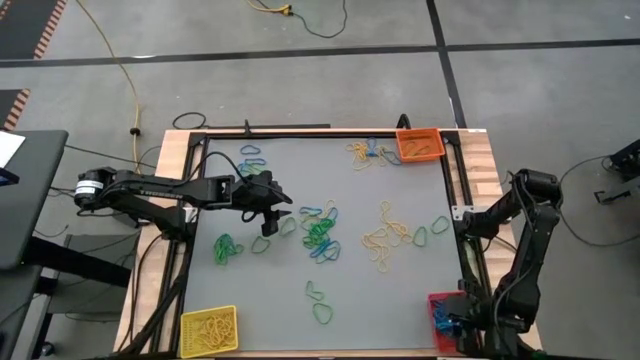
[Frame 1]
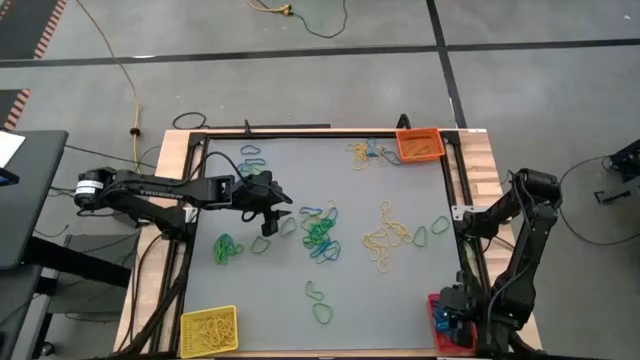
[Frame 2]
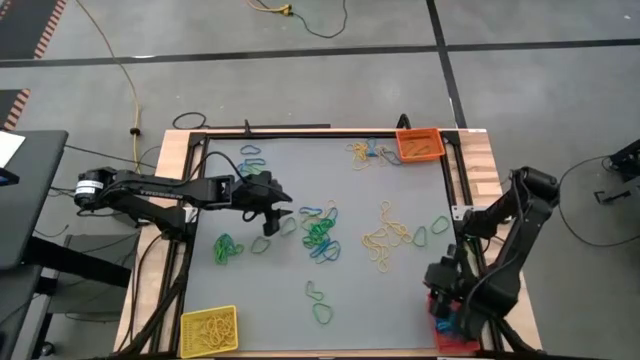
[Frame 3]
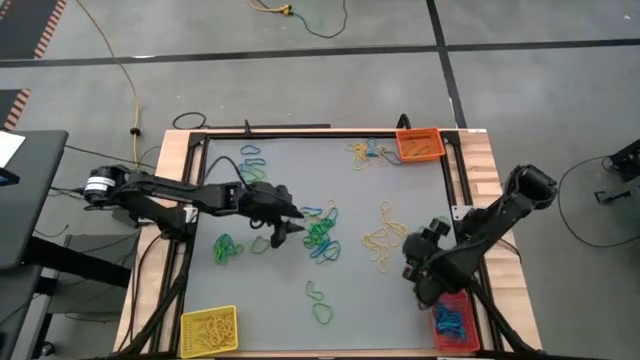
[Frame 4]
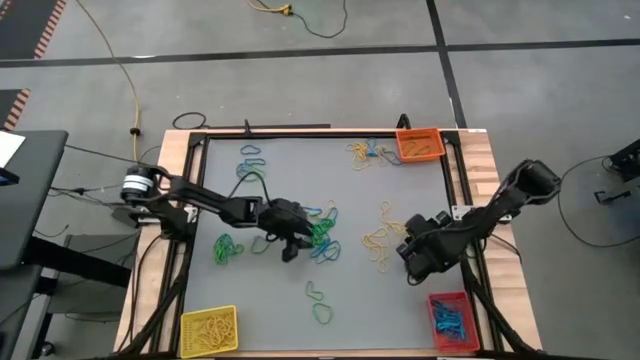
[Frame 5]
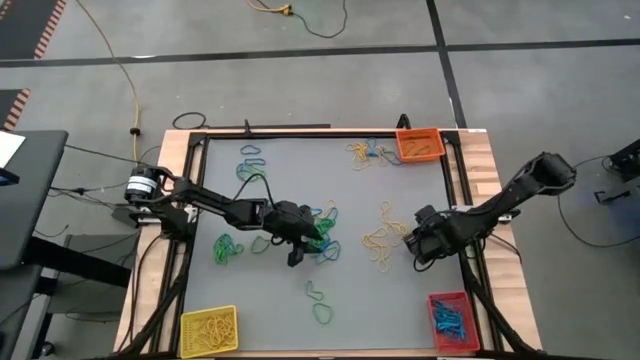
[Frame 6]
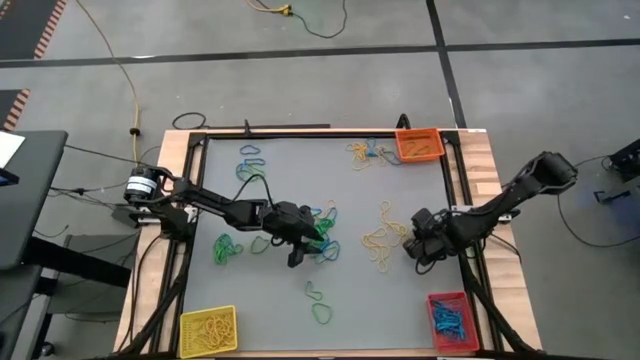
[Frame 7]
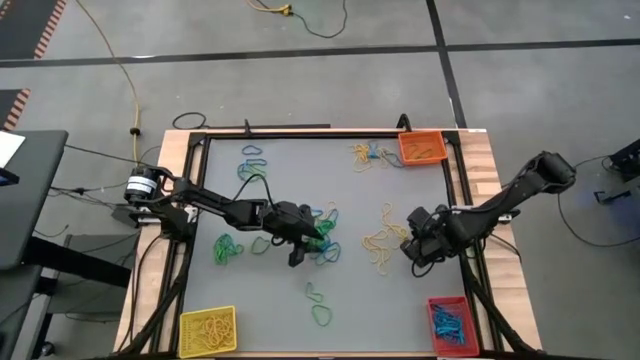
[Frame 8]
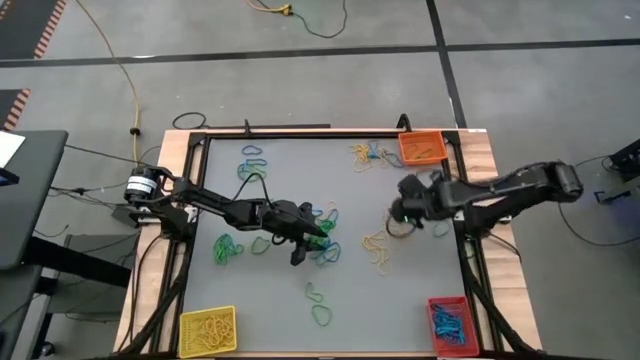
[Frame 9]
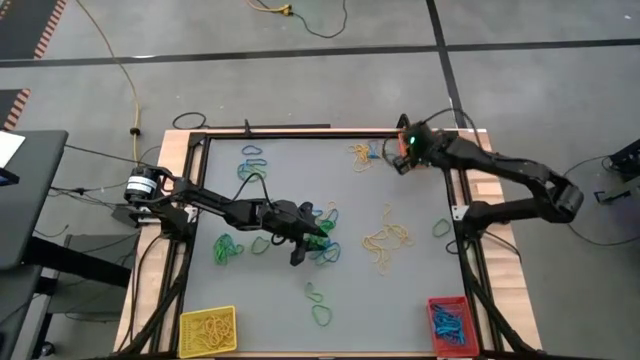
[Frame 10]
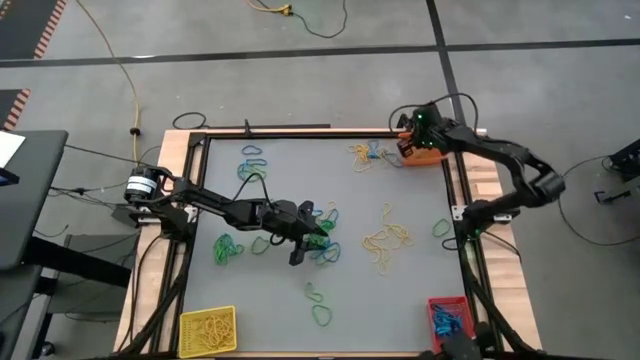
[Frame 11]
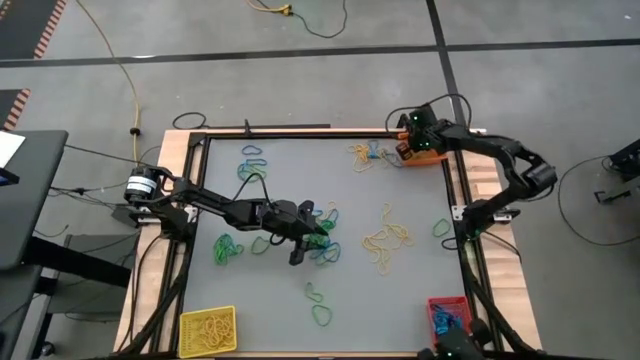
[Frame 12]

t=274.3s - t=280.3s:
Task: Sort rubber bands into baskets
Put the green rubber band into the orange bin

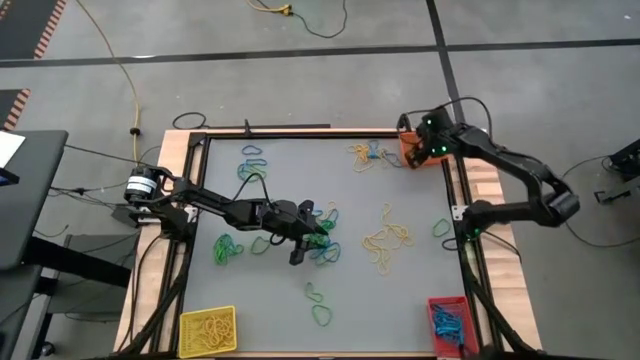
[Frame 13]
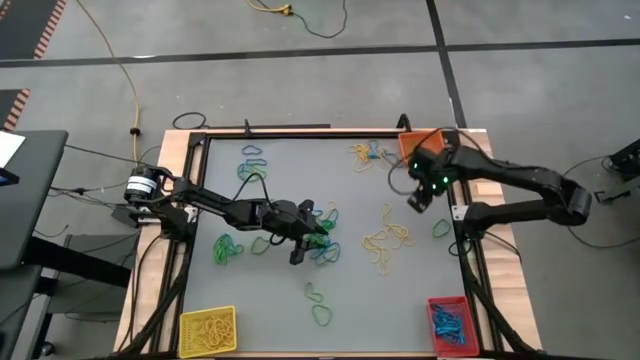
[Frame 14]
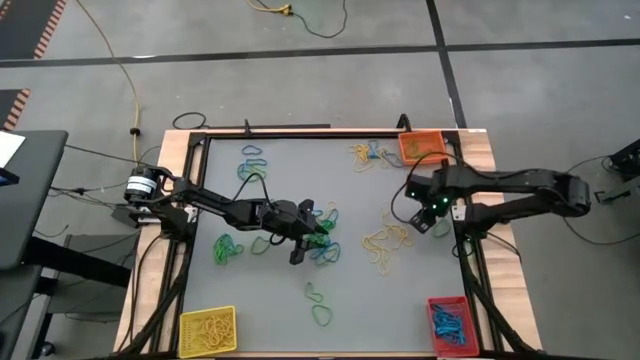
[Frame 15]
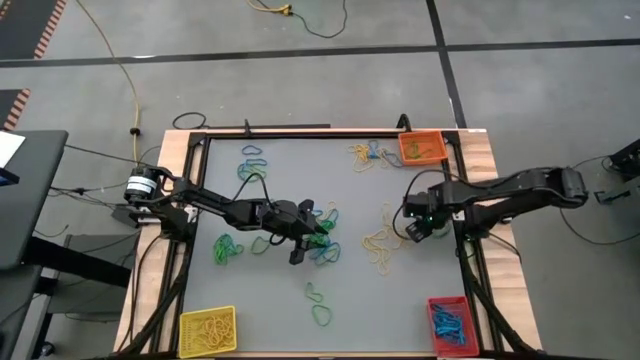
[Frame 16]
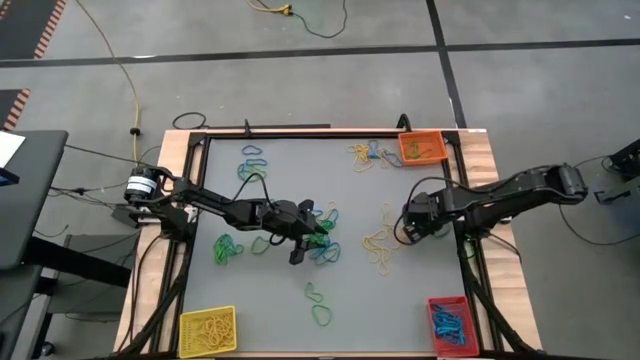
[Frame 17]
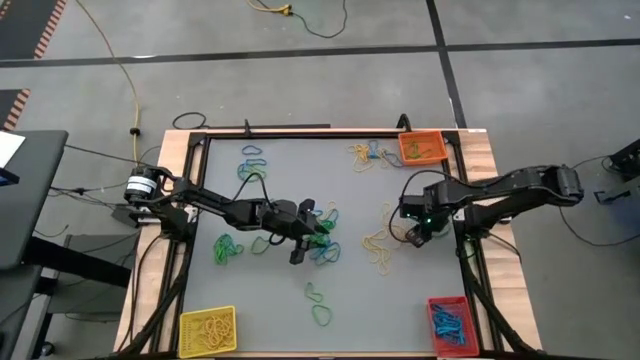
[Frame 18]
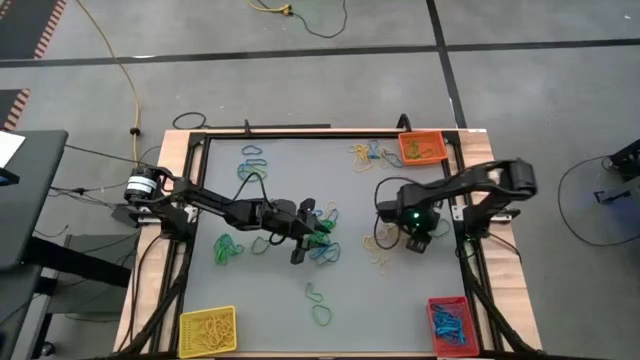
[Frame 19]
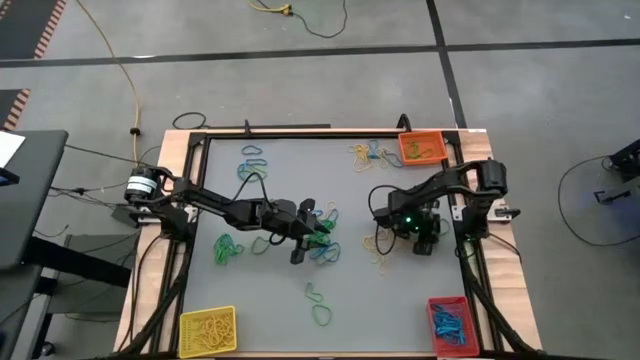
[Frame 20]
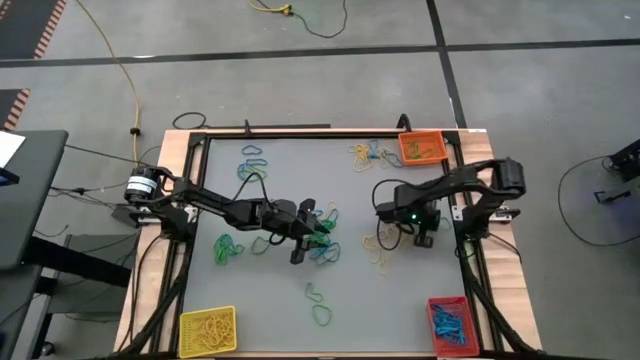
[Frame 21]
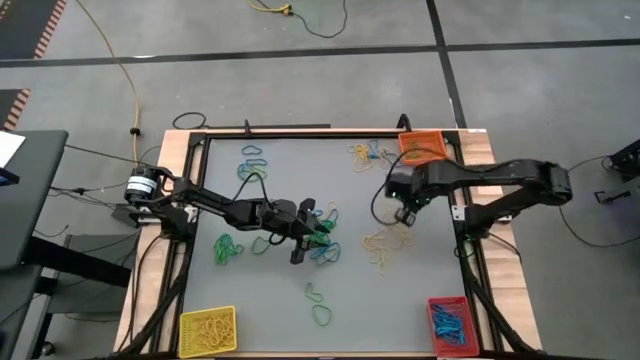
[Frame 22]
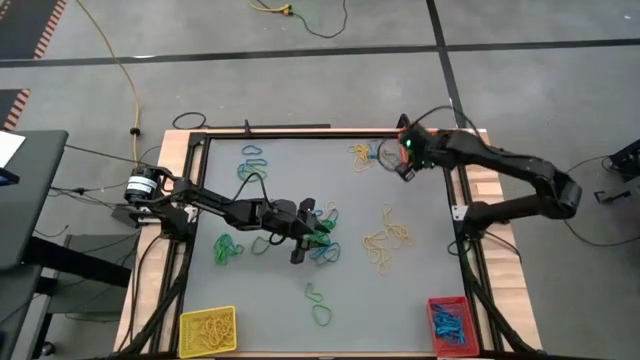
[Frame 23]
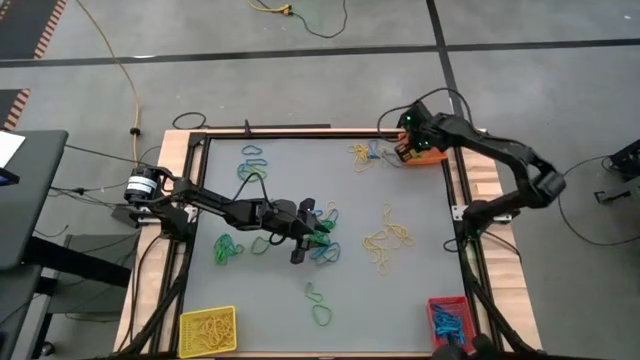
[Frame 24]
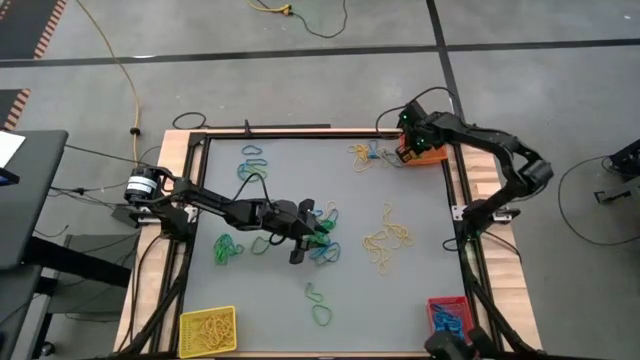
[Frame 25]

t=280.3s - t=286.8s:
Put the green rubber band into the orange bin

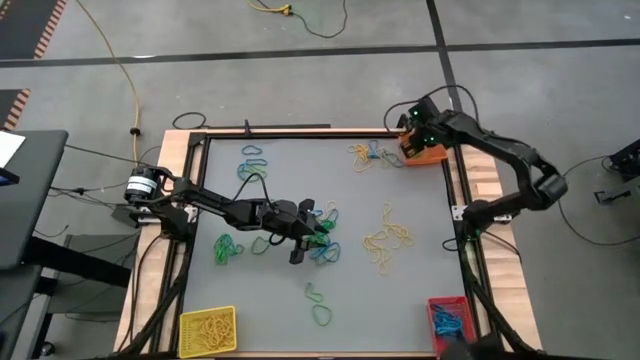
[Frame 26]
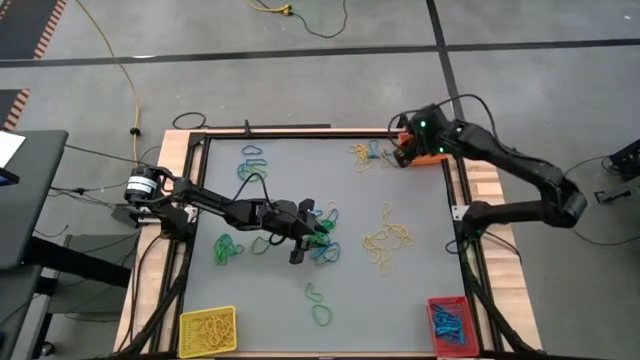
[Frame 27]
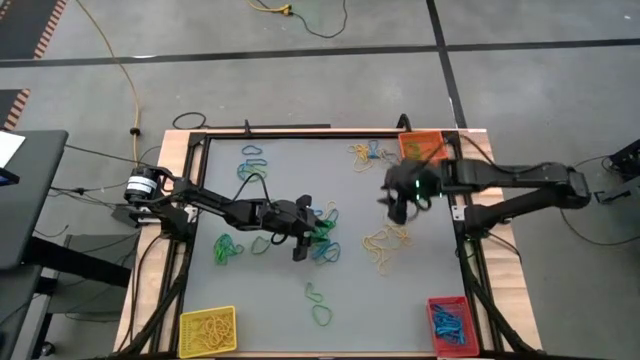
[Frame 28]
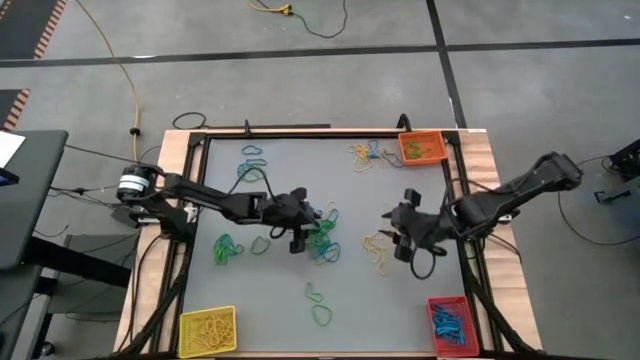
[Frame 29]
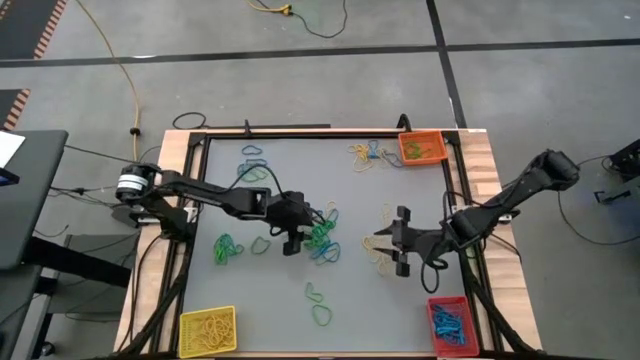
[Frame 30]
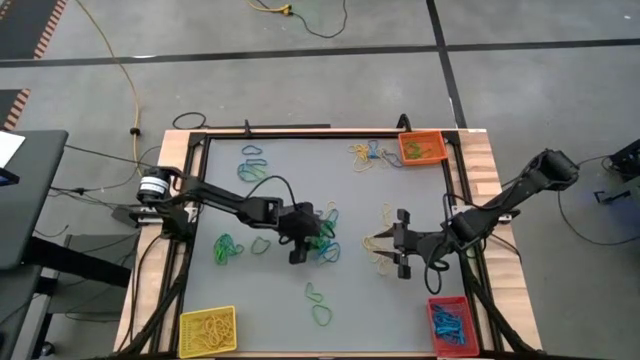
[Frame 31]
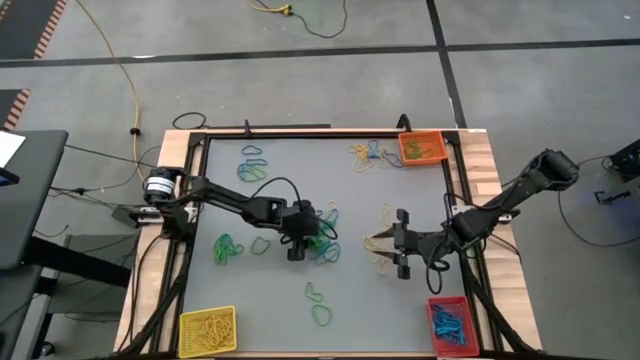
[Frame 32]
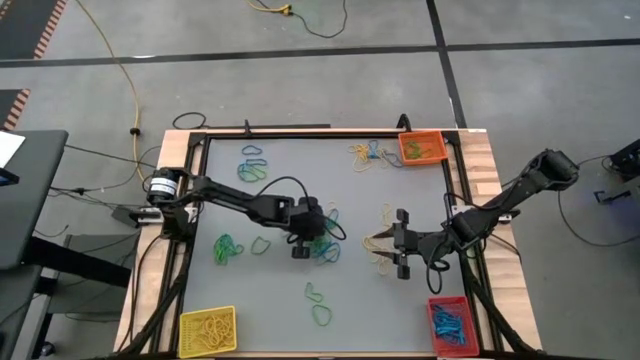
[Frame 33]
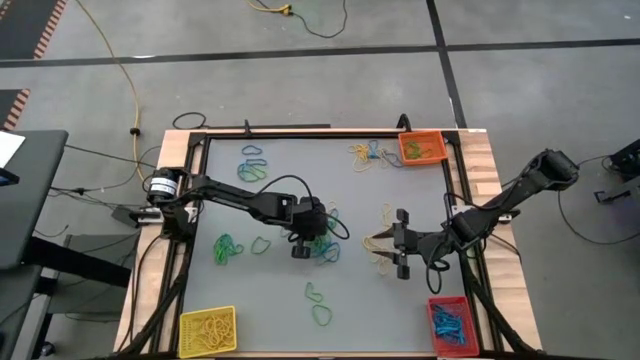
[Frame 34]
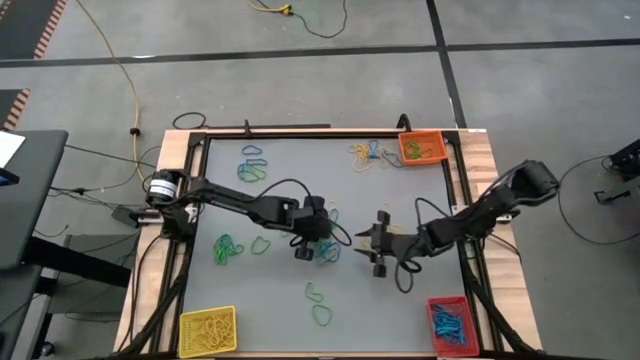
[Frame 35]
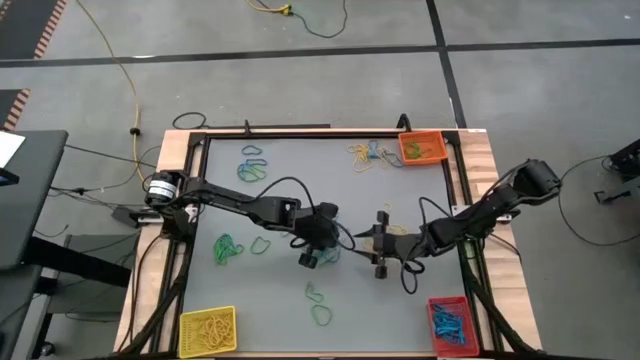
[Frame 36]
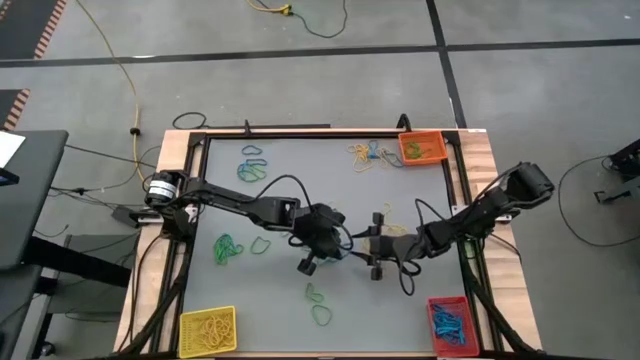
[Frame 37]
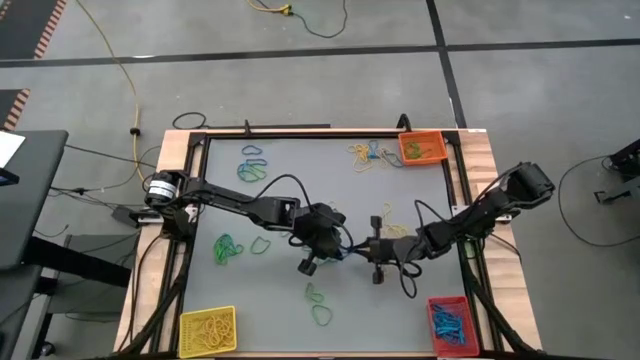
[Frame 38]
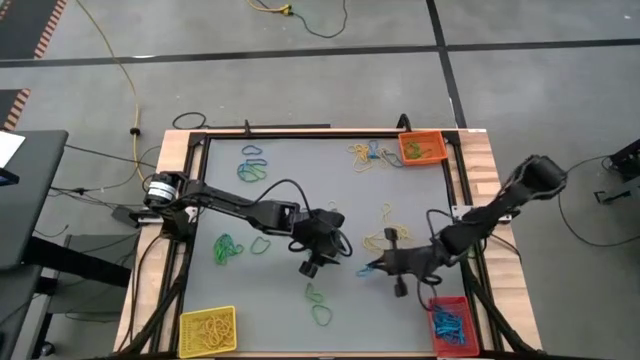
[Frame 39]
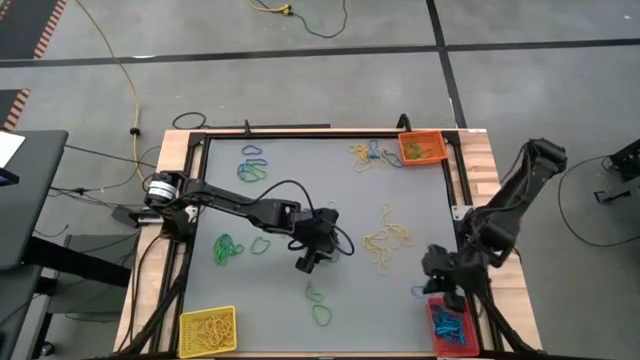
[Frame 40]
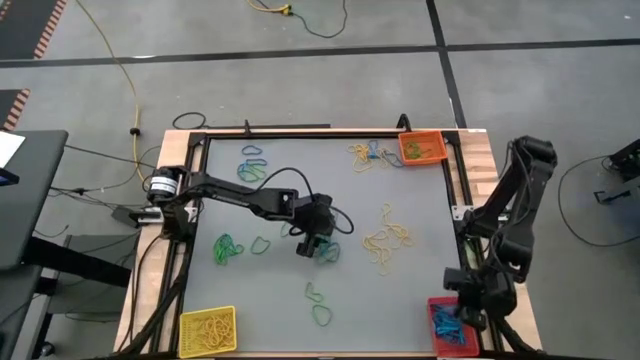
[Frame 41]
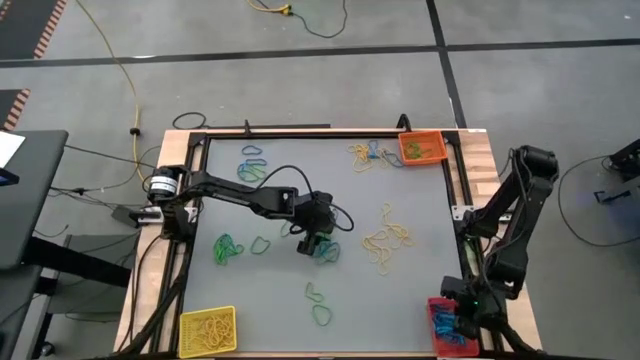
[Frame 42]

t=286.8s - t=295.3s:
Put the blue rubber band into the red bin
